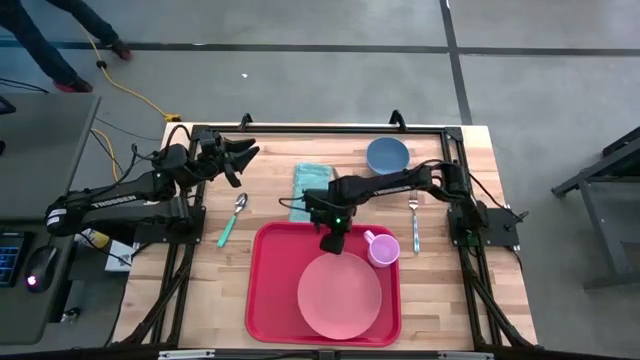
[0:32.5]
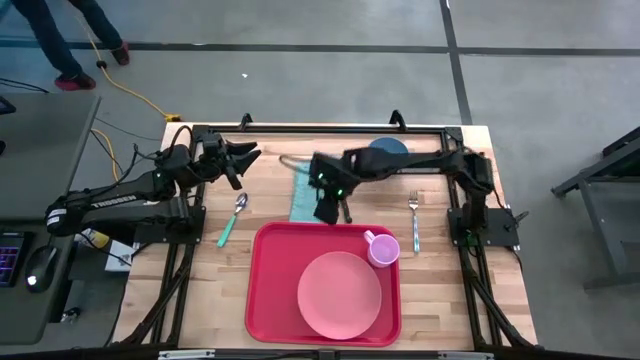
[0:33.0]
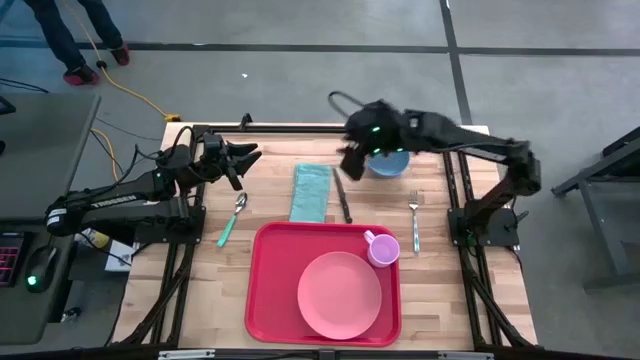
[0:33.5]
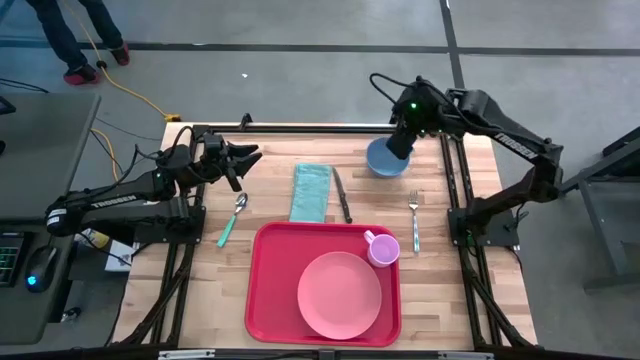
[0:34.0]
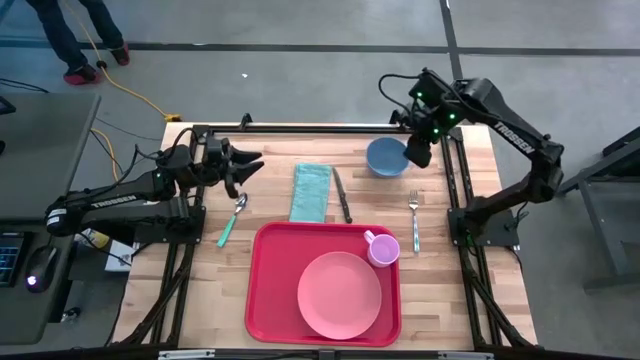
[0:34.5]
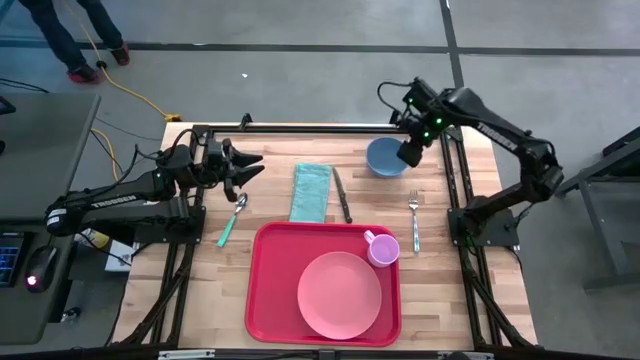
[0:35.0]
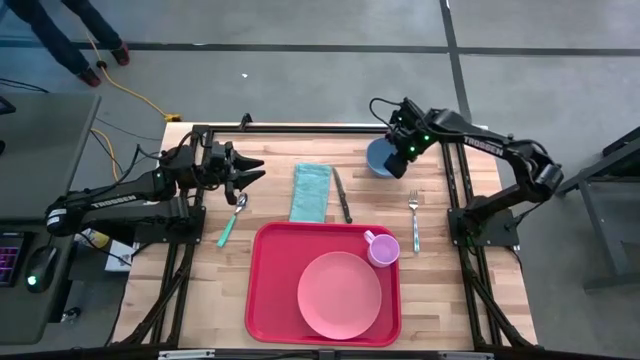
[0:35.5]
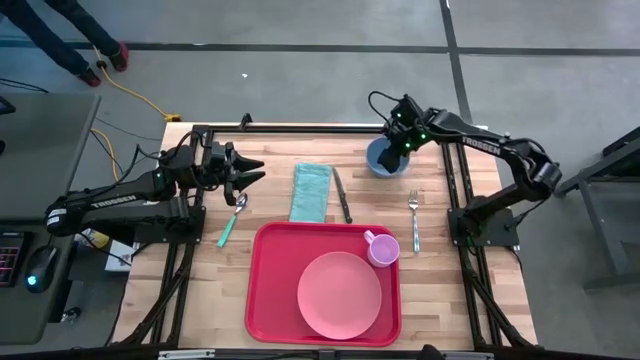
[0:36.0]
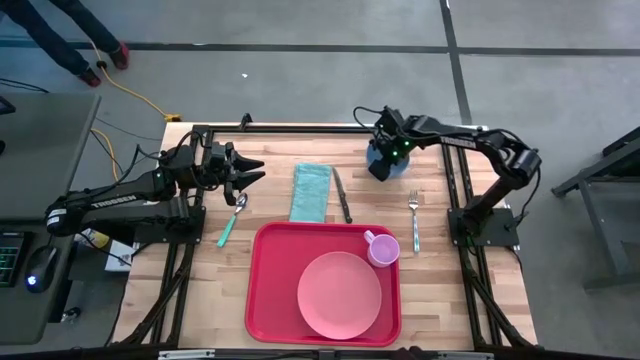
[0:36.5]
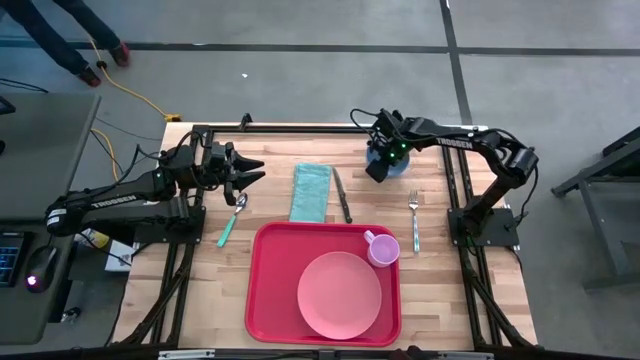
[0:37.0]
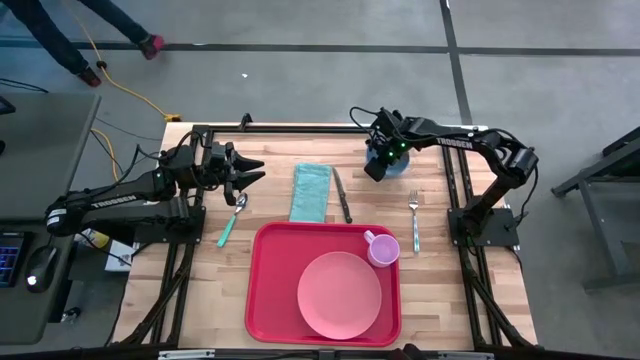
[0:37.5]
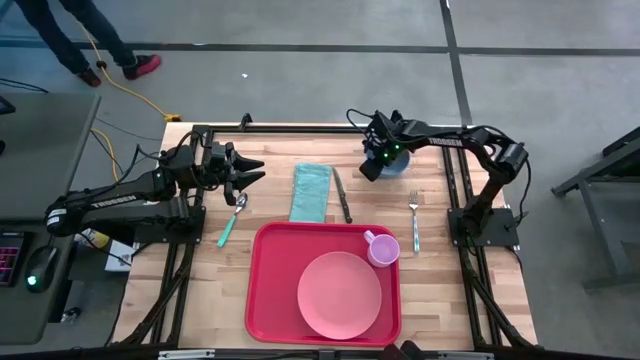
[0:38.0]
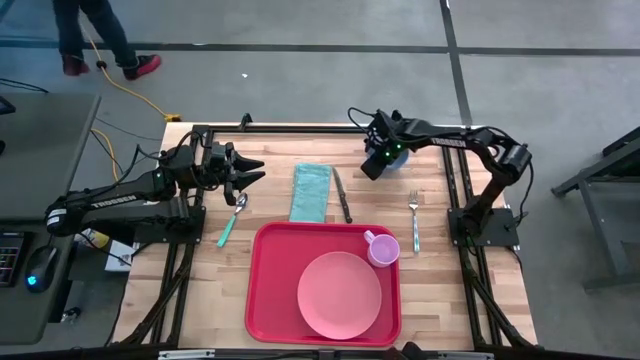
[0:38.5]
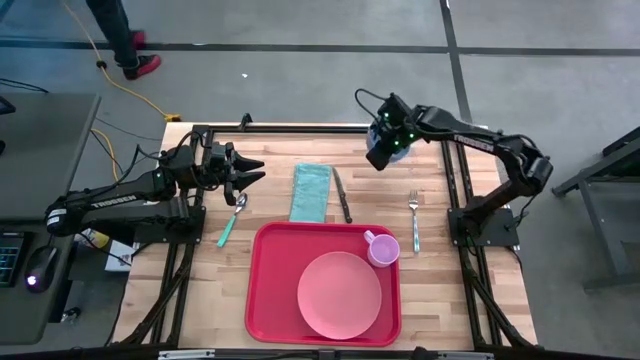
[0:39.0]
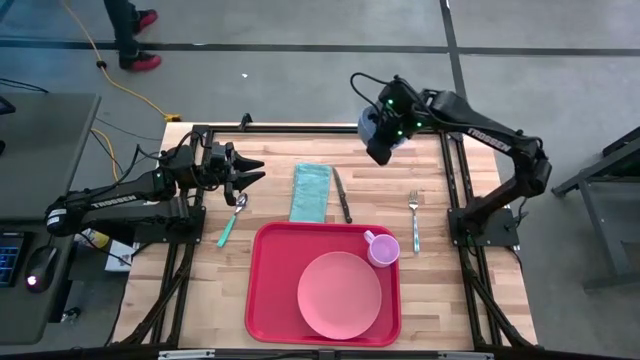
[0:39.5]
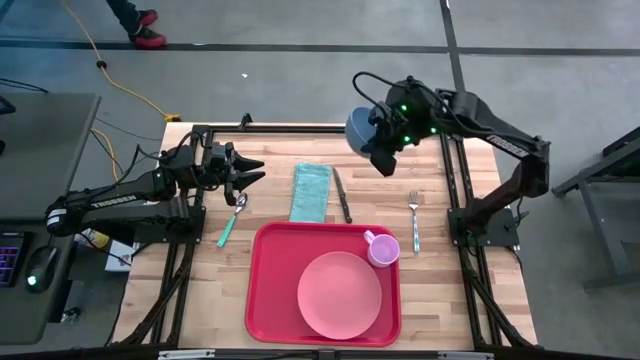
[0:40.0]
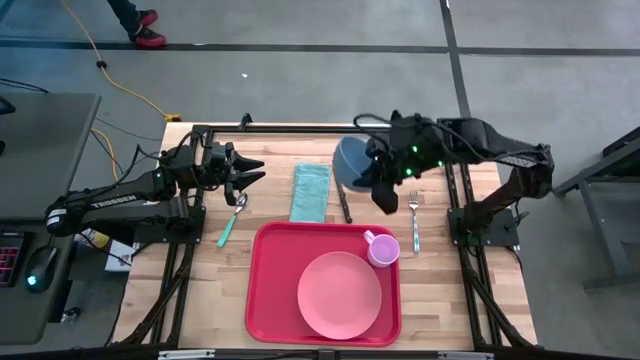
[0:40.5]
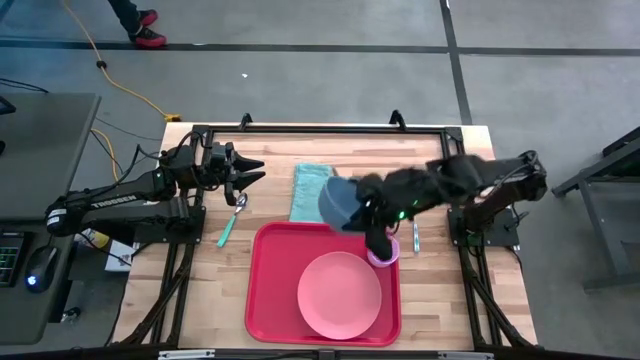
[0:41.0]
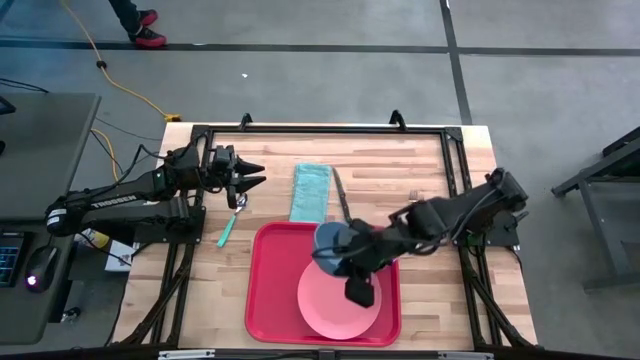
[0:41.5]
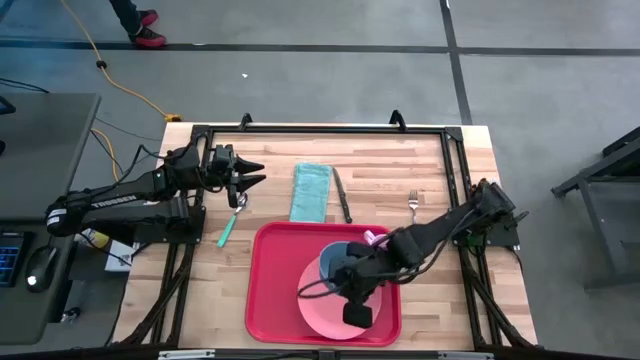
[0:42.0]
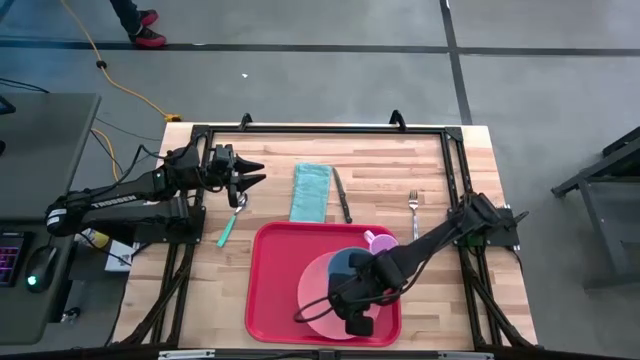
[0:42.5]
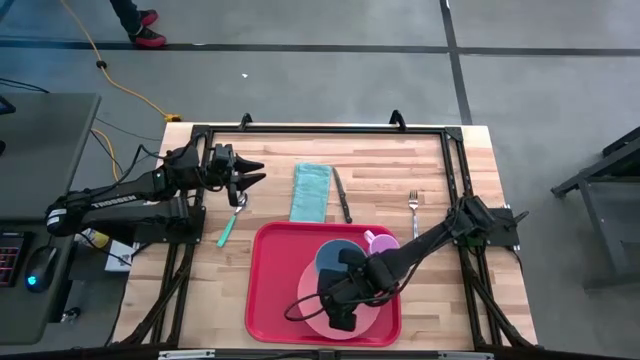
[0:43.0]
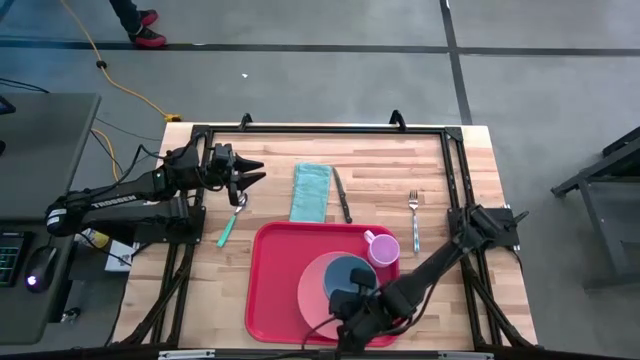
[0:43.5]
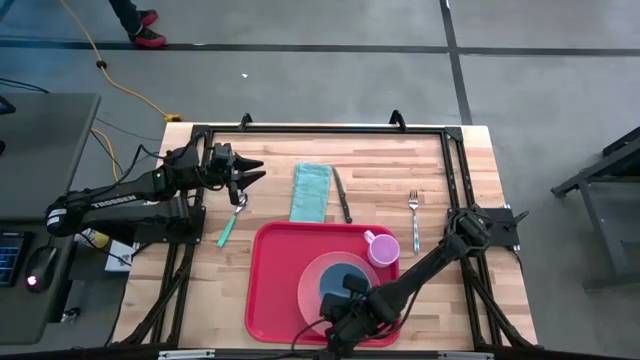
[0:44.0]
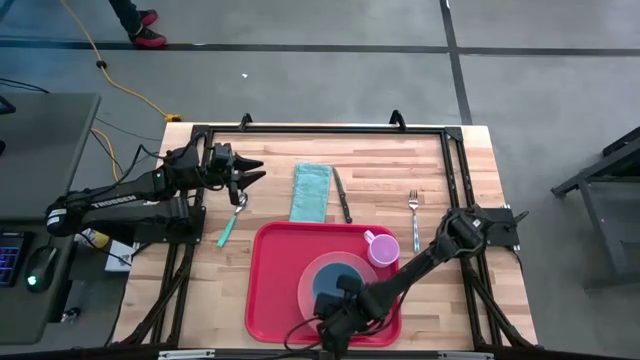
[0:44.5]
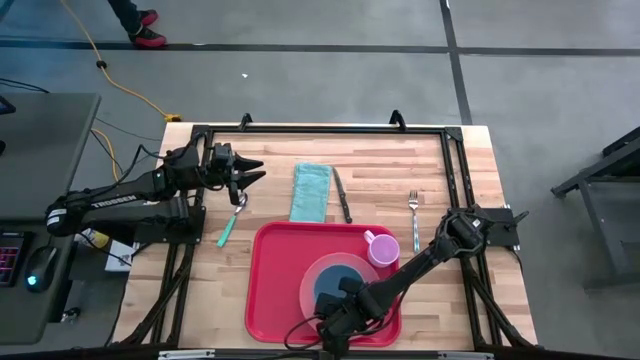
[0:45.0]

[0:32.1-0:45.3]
Task: Set up tray
Put the blue bowl on the pink plate

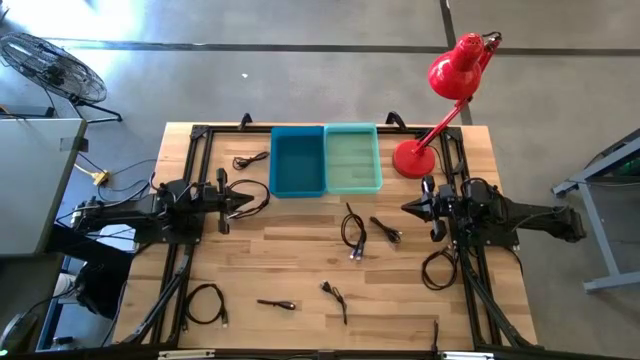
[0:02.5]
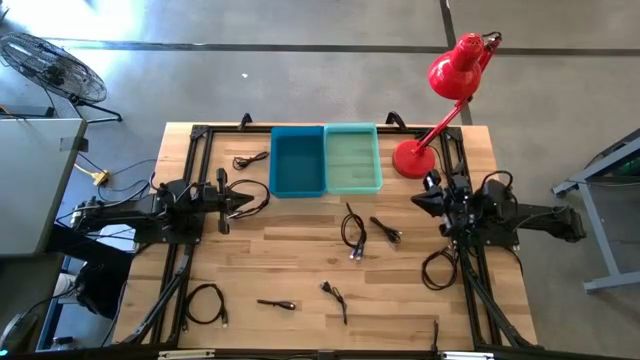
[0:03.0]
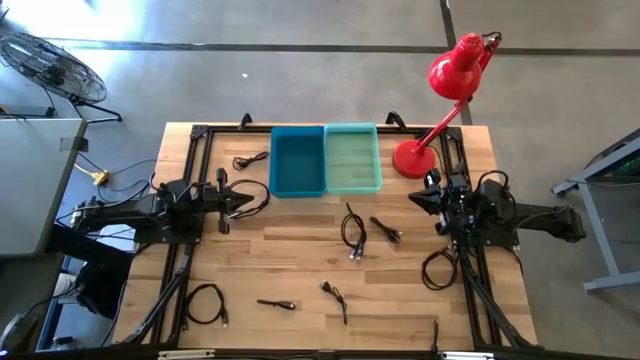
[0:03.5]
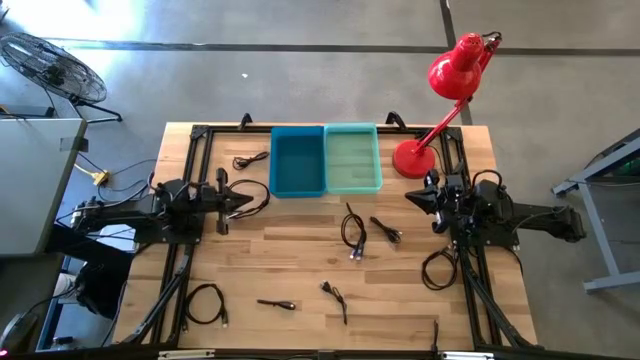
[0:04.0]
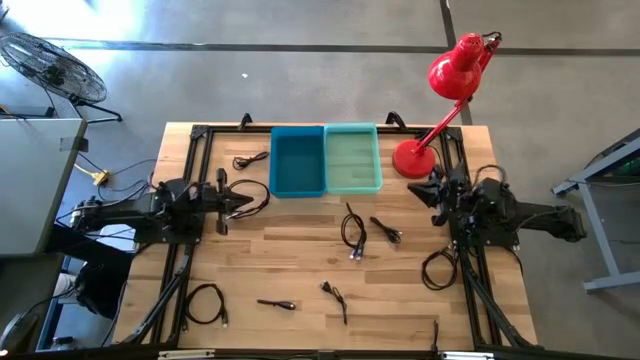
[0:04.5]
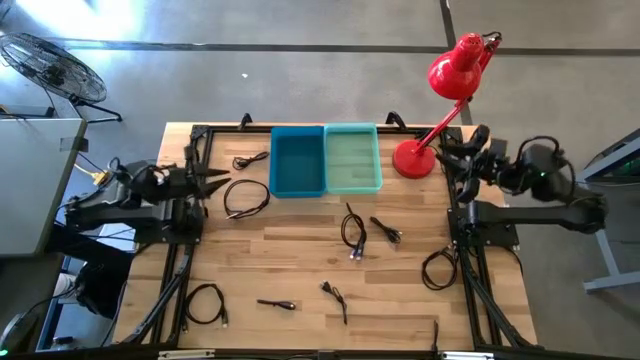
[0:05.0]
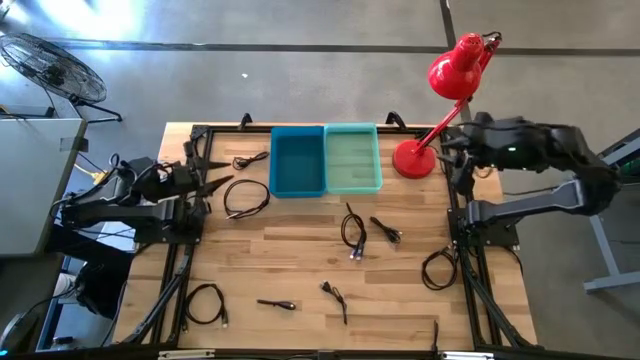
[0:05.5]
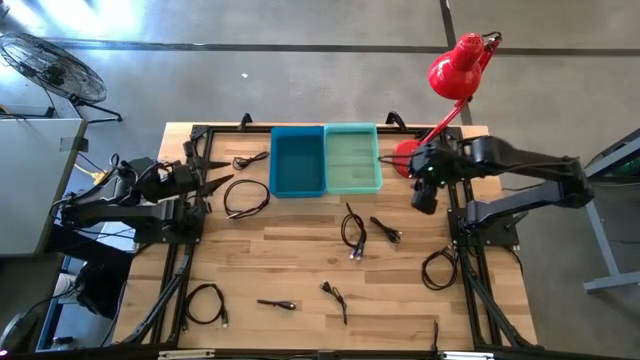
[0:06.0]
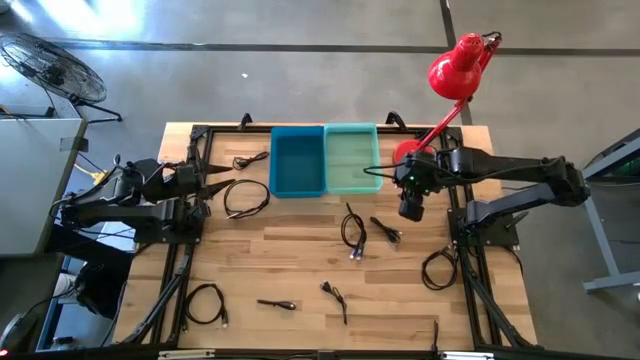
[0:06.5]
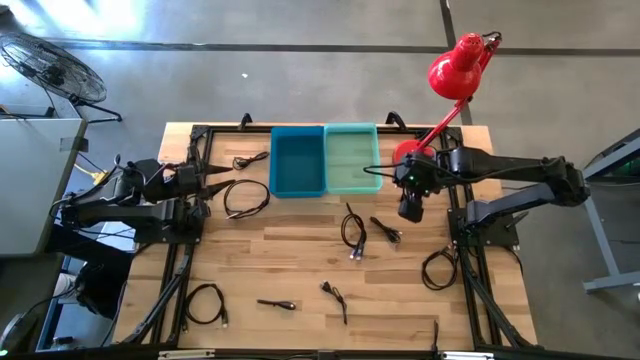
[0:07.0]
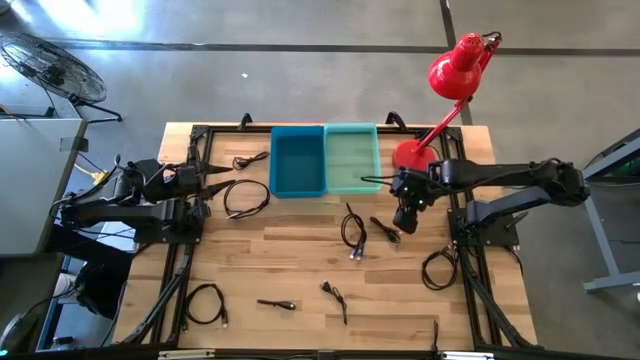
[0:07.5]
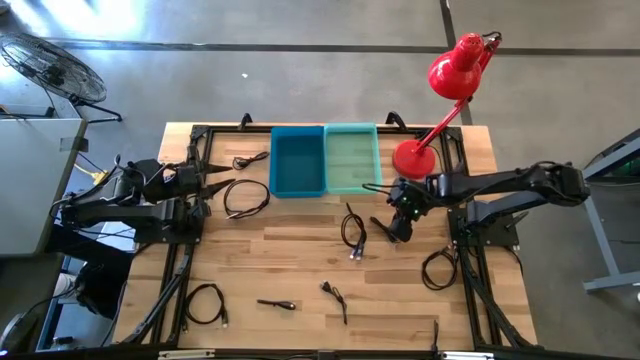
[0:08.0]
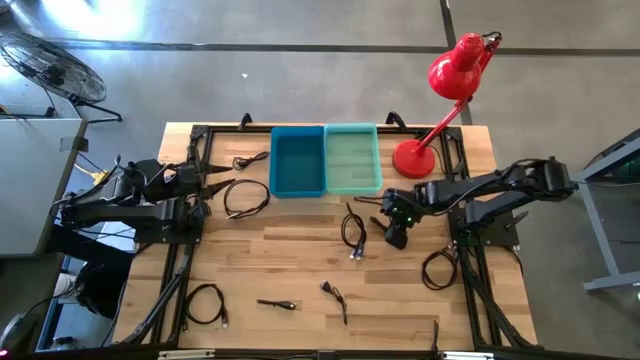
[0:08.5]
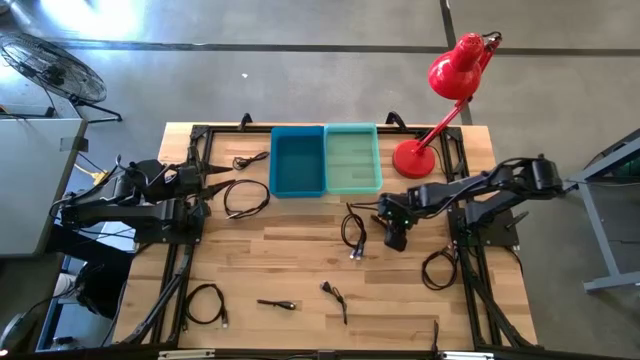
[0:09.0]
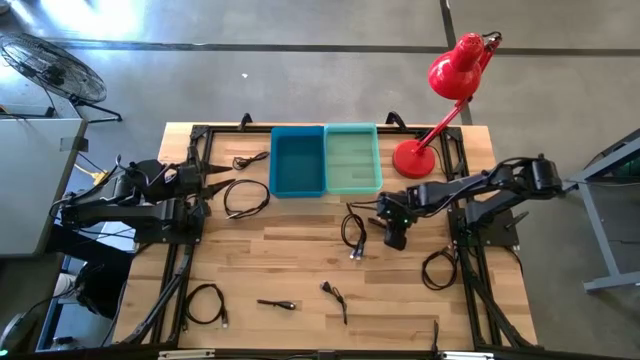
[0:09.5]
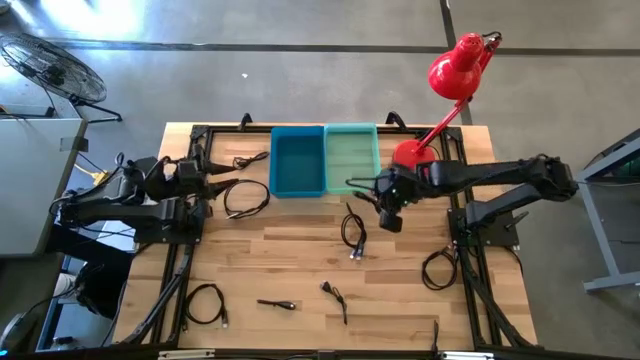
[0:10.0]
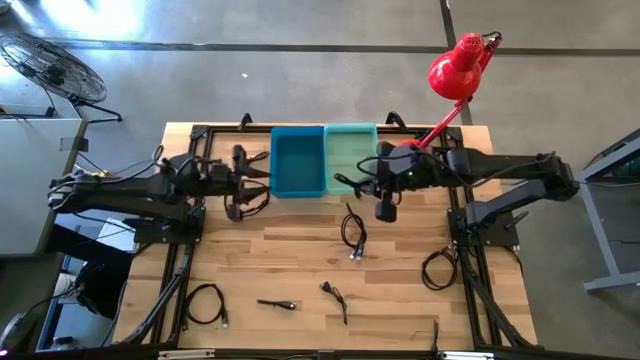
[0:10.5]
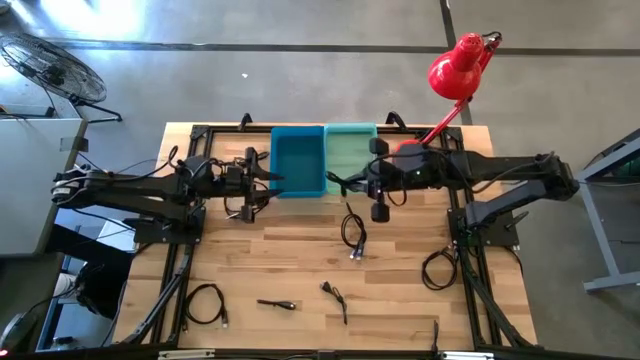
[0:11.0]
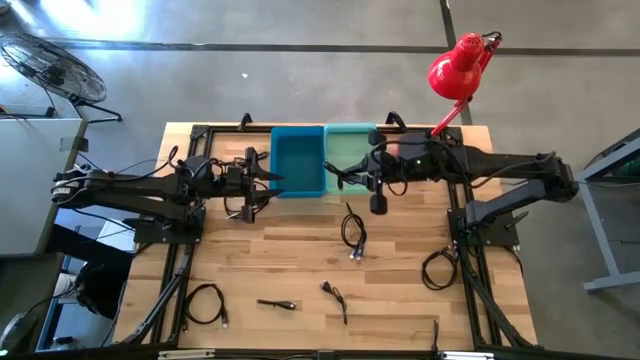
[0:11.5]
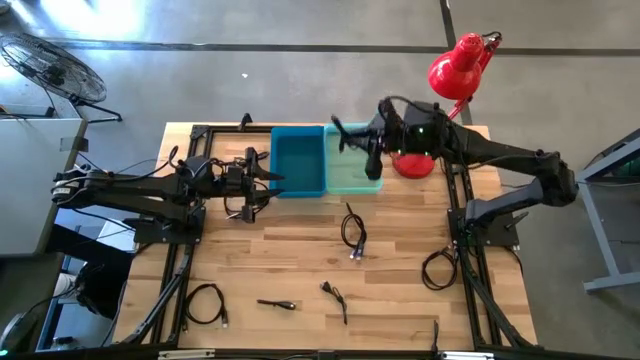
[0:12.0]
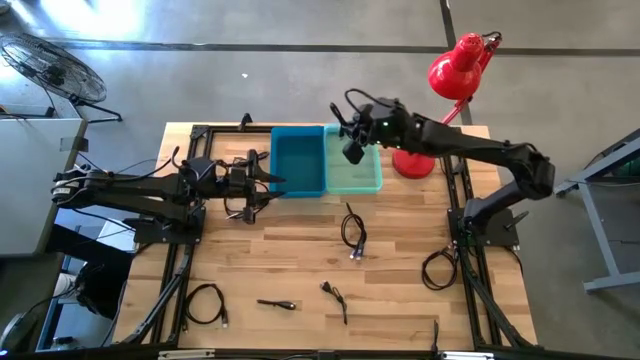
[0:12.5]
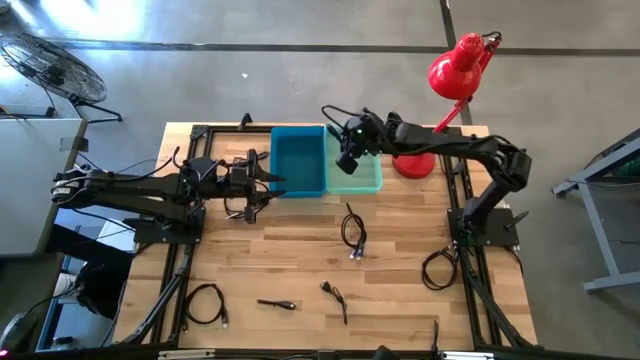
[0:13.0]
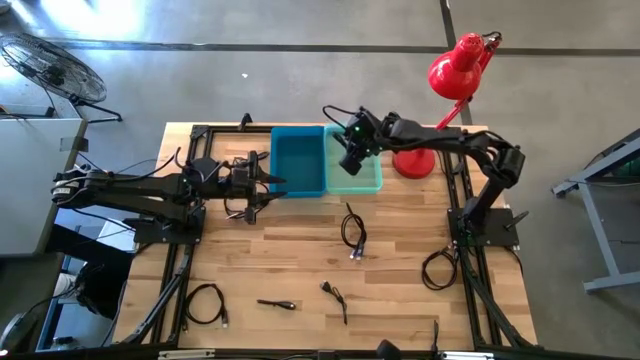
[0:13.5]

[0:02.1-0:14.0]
Task: Pick & Place USB Port
Put the black USB cable into the green bin
